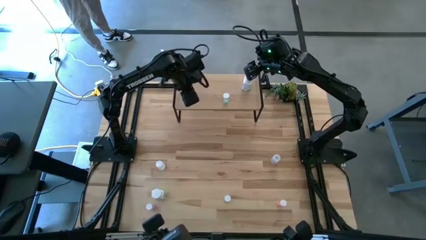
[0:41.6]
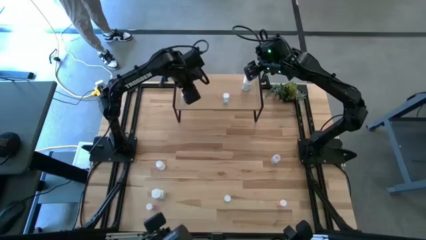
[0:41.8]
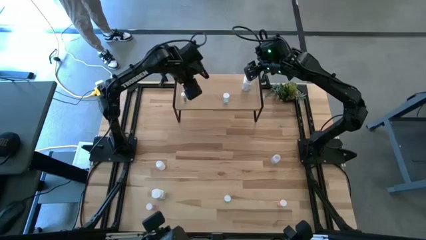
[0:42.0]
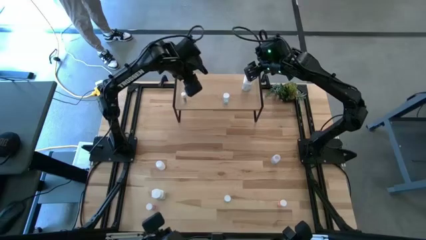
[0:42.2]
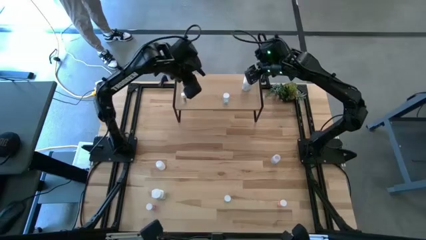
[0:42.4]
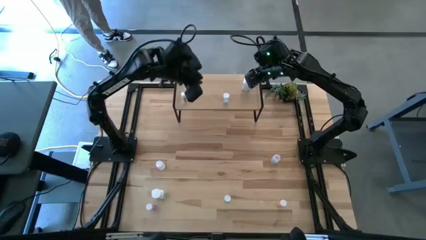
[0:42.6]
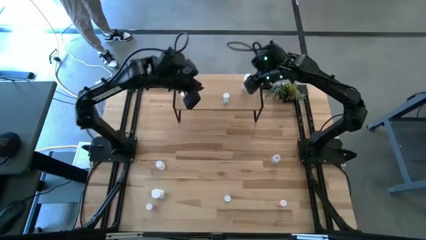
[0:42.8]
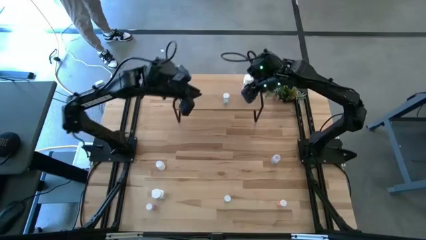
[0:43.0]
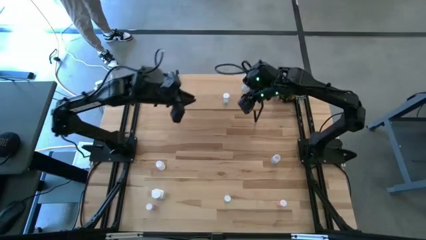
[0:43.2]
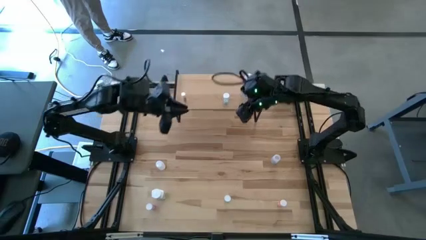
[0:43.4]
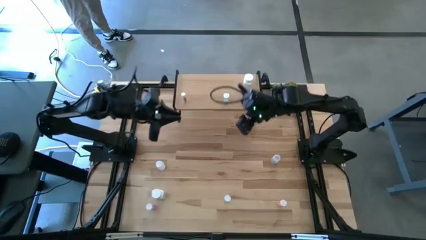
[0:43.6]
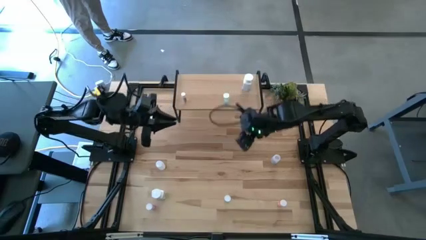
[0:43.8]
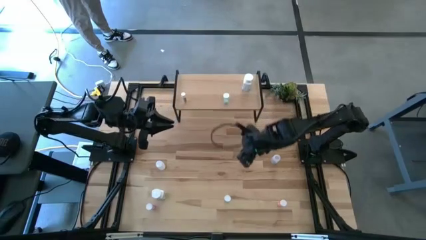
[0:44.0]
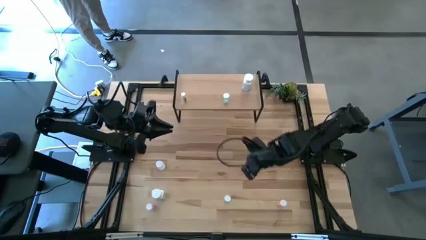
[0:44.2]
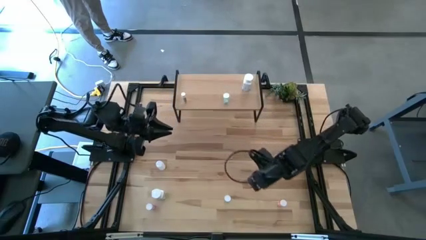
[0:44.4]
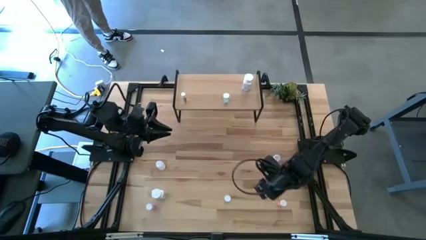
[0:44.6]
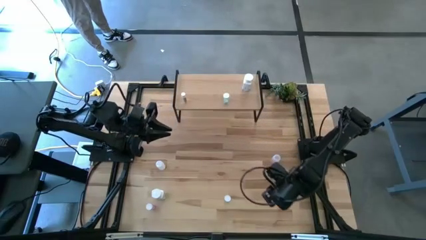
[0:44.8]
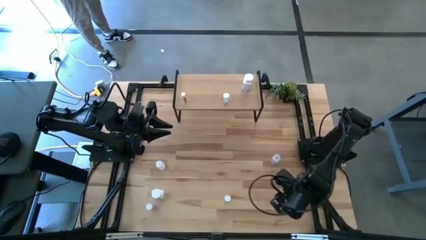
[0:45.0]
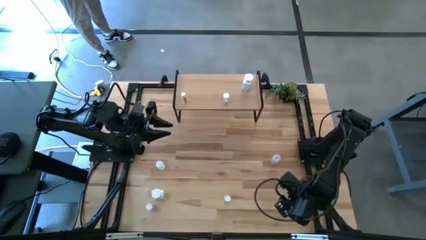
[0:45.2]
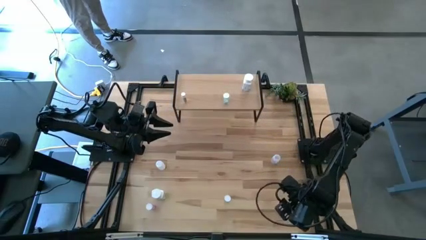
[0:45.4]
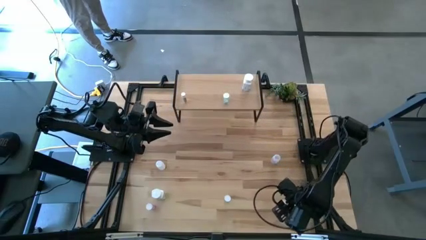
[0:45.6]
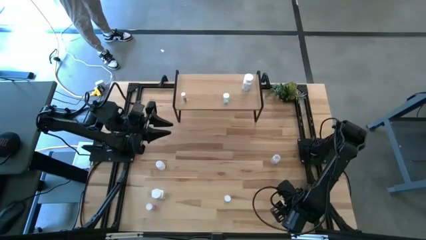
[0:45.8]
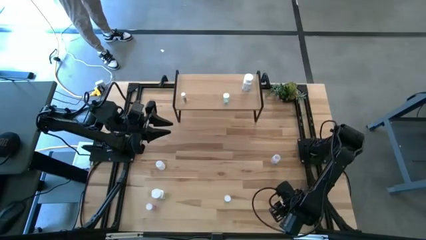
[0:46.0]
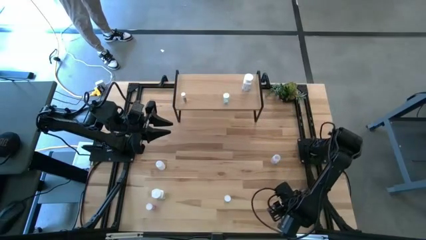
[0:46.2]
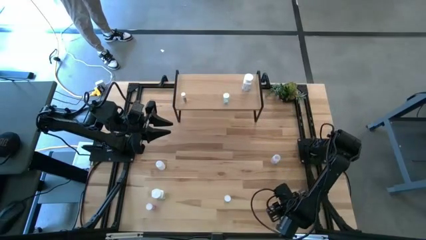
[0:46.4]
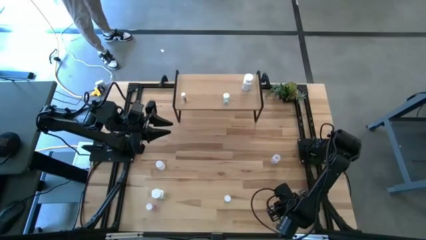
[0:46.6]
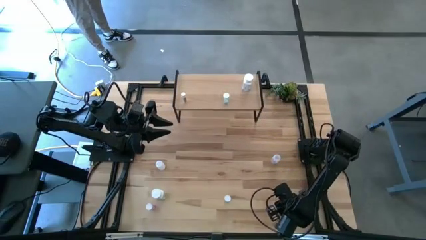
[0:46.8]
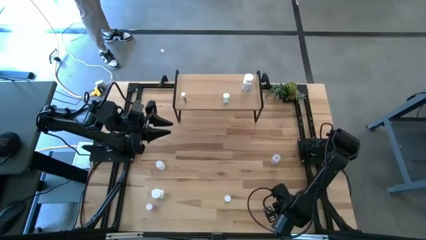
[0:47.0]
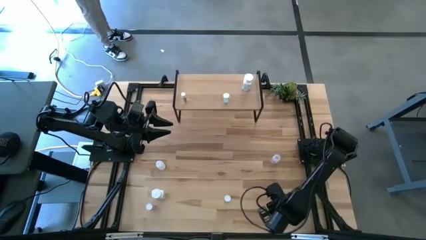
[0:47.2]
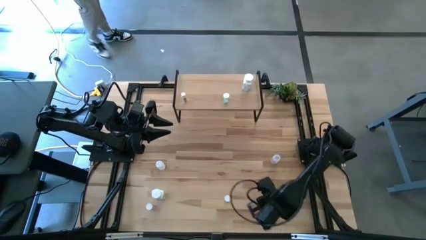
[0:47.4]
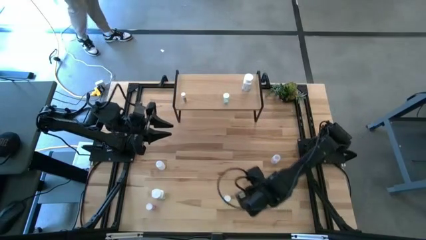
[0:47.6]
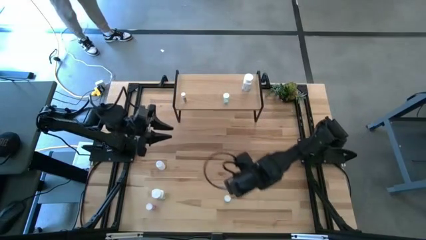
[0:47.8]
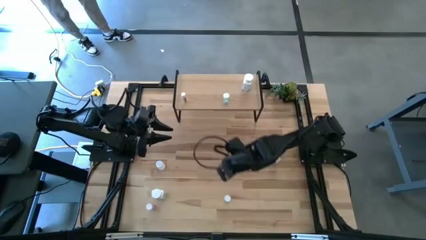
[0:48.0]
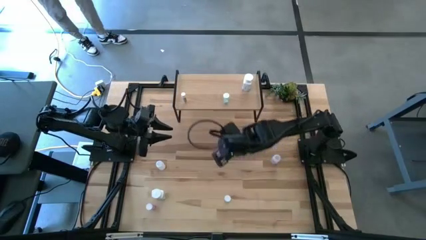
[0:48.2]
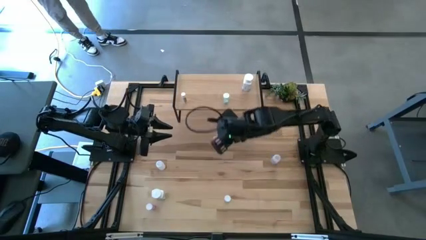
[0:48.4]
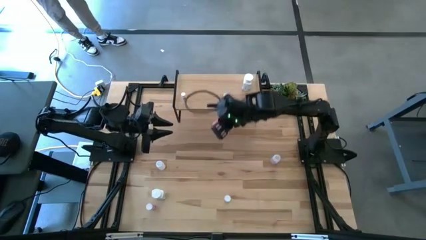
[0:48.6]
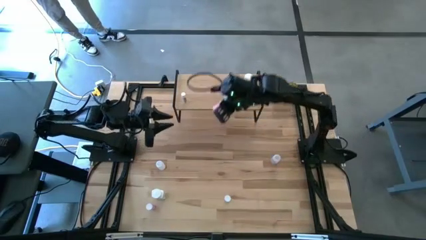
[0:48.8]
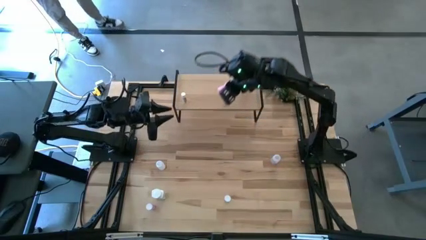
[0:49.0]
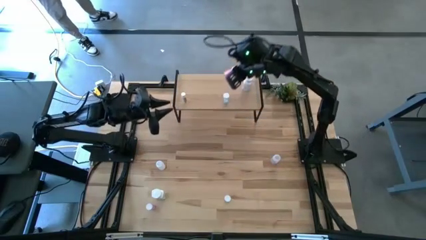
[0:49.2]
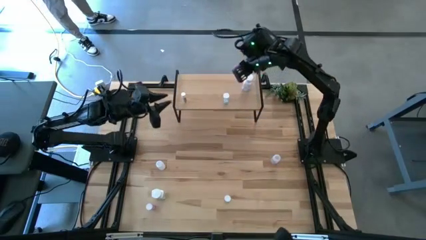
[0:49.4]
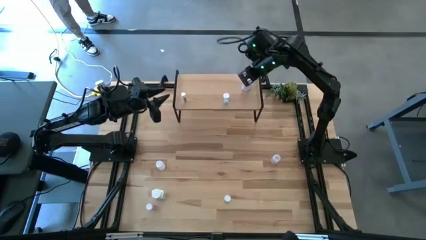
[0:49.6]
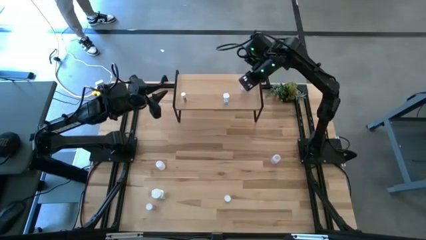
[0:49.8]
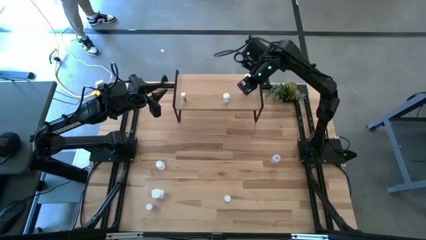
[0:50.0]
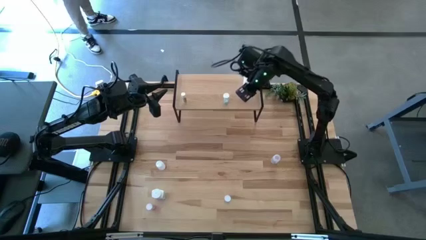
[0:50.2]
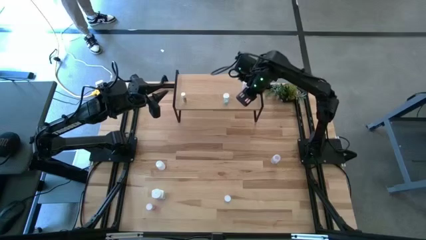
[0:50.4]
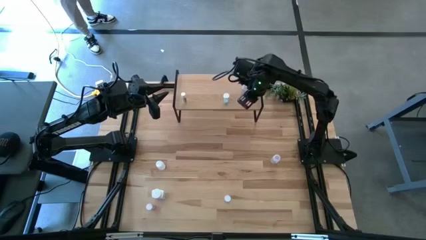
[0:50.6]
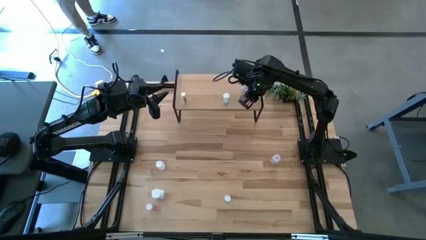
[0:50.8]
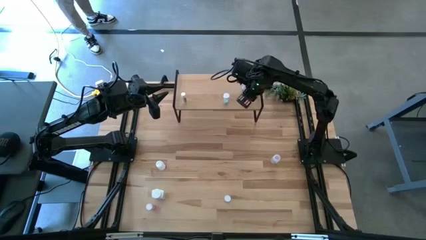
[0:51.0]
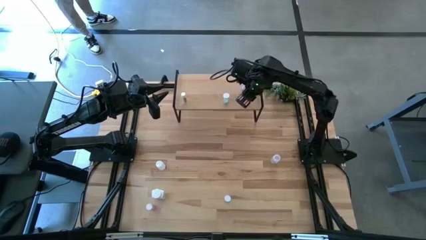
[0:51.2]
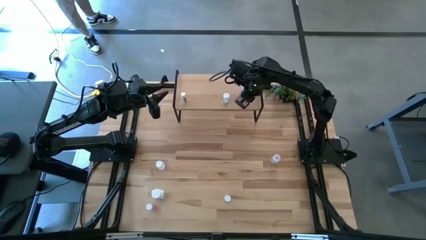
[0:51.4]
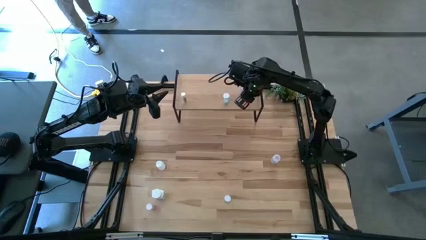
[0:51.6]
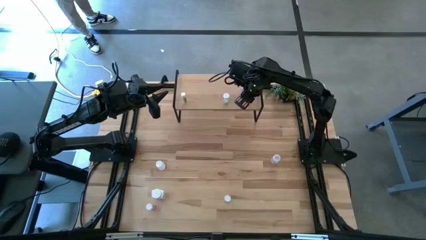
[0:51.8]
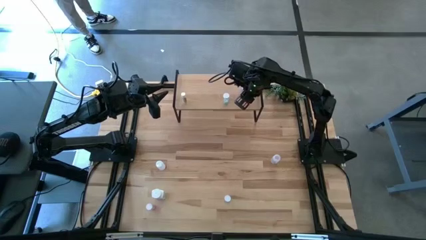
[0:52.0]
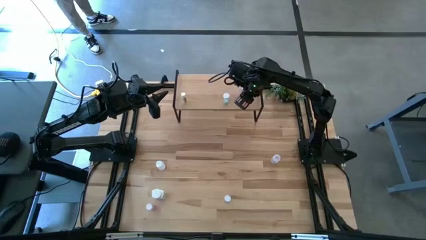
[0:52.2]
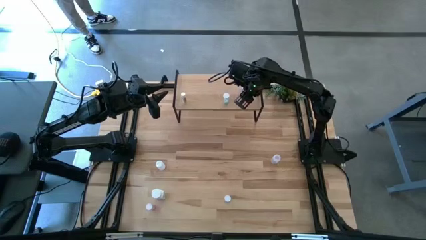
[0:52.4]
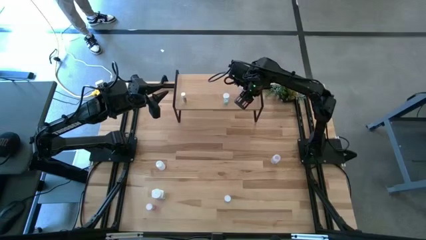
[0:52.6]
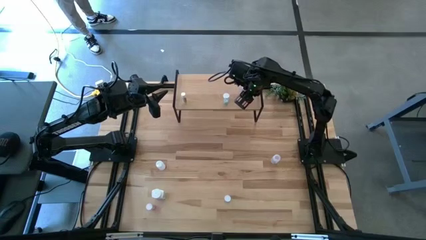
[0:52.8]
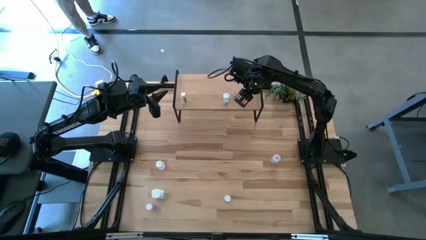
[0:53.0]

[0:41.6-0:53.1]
Task: Pick and place medicine bottles onto shelf by color
Put the pink pill bottle on the shelf
